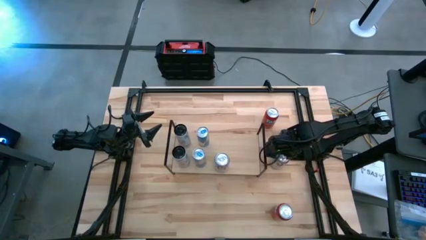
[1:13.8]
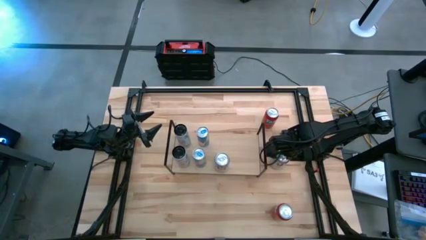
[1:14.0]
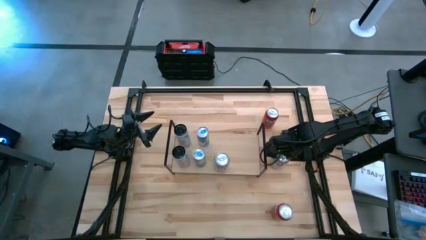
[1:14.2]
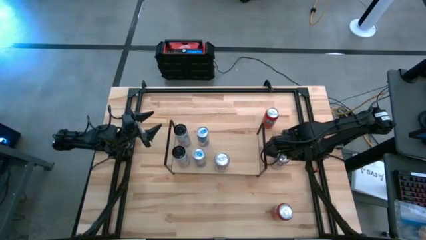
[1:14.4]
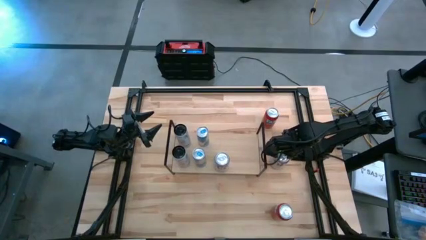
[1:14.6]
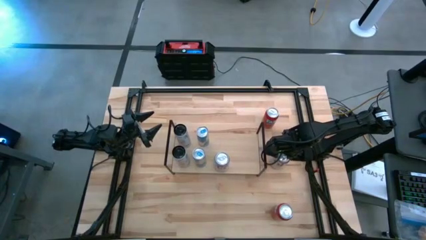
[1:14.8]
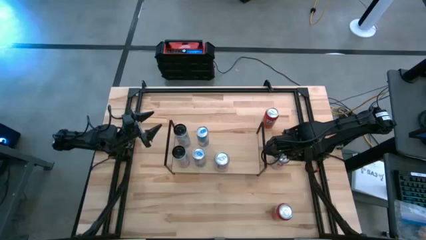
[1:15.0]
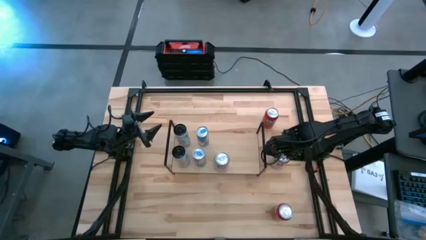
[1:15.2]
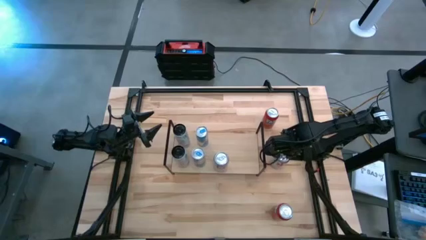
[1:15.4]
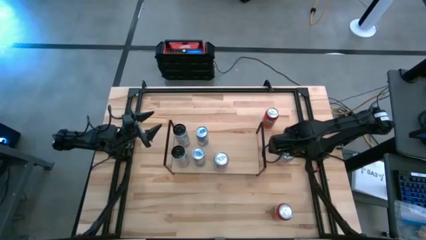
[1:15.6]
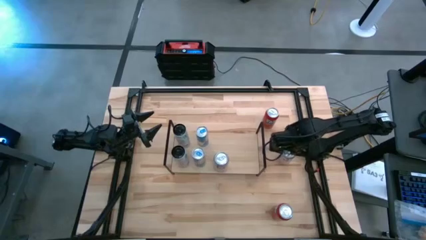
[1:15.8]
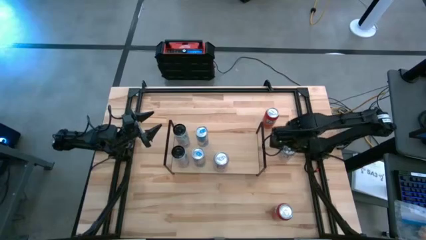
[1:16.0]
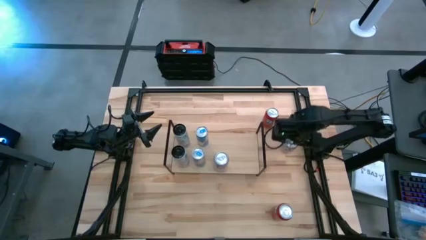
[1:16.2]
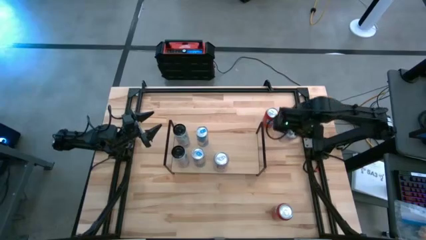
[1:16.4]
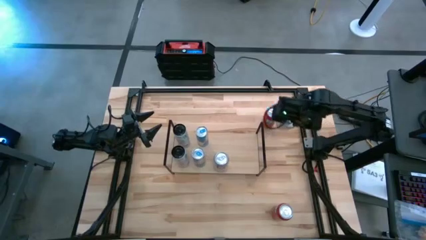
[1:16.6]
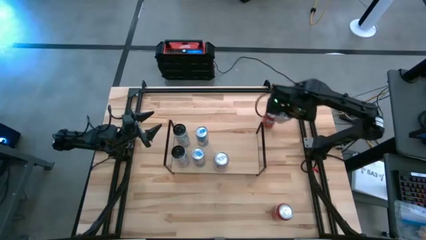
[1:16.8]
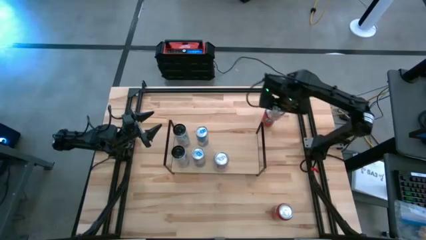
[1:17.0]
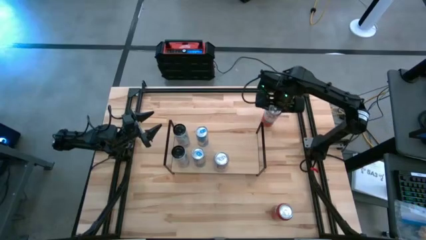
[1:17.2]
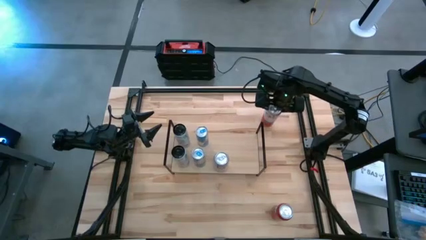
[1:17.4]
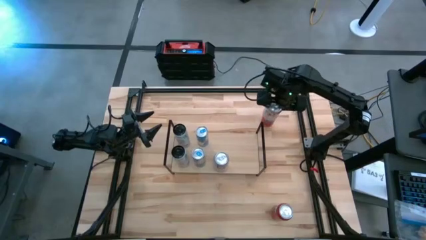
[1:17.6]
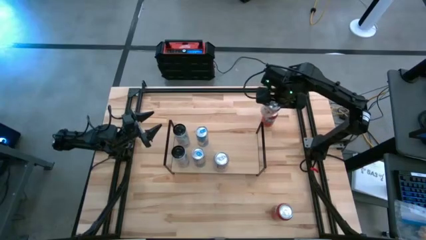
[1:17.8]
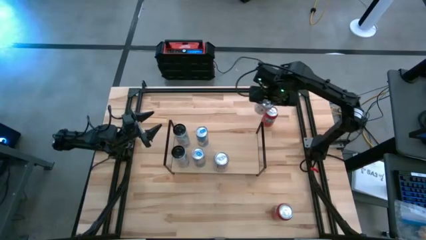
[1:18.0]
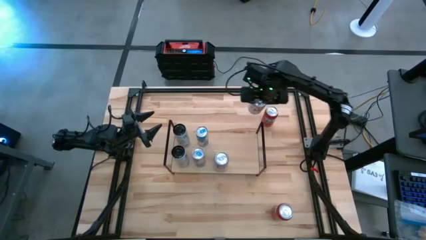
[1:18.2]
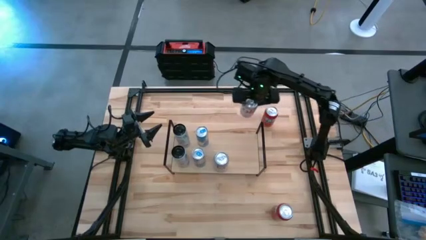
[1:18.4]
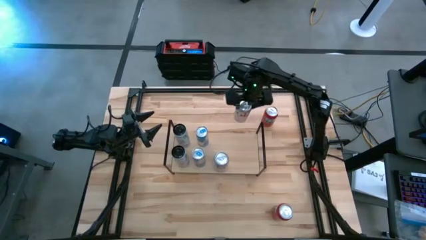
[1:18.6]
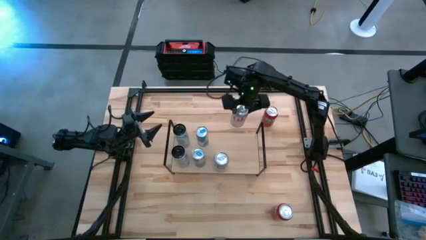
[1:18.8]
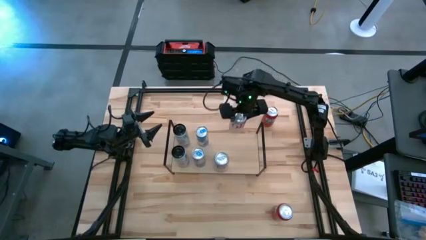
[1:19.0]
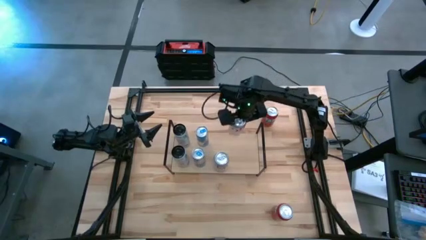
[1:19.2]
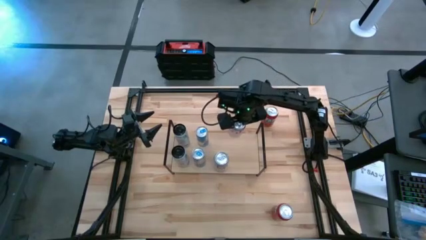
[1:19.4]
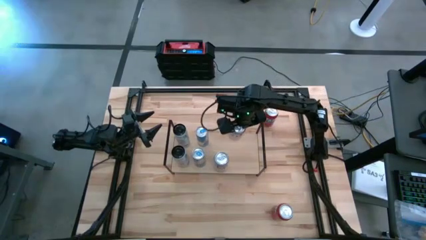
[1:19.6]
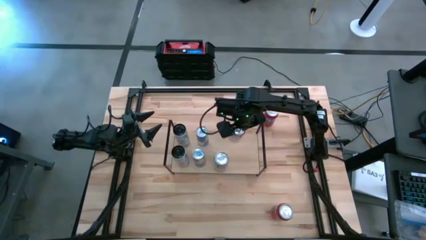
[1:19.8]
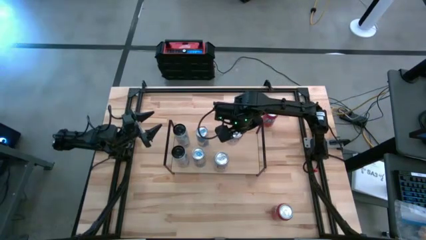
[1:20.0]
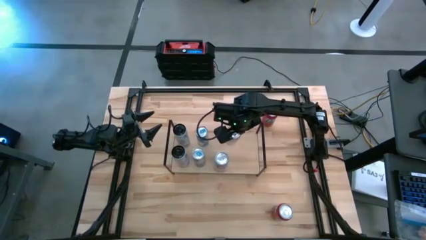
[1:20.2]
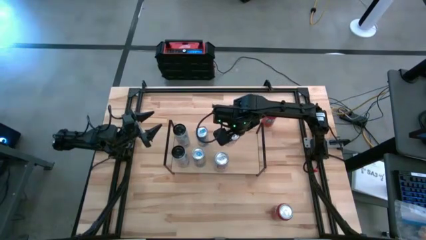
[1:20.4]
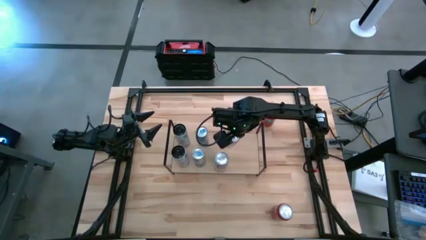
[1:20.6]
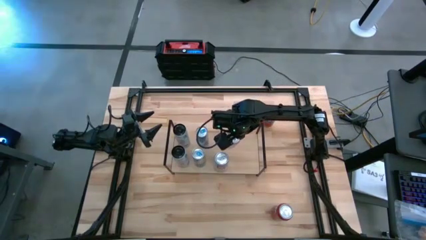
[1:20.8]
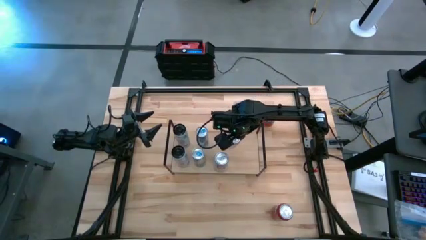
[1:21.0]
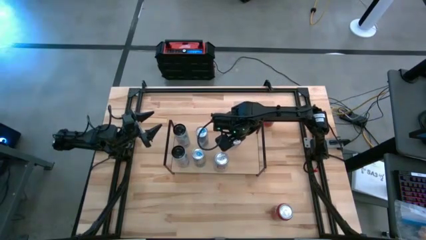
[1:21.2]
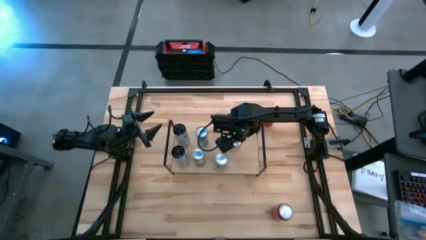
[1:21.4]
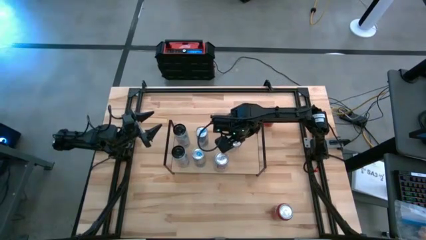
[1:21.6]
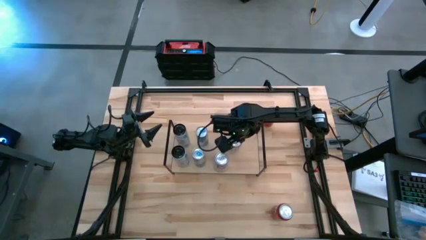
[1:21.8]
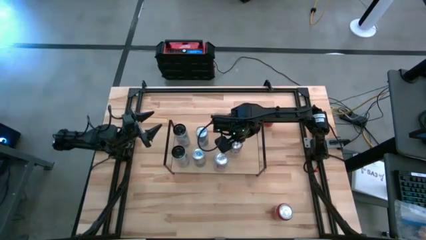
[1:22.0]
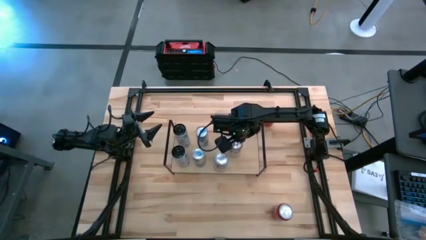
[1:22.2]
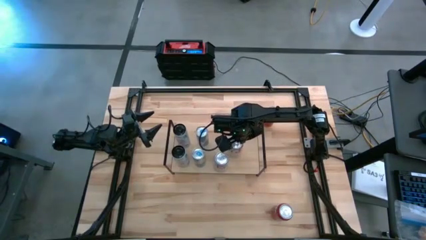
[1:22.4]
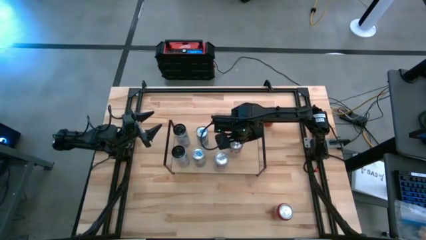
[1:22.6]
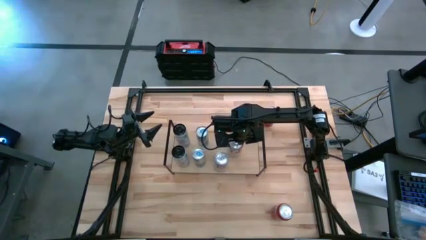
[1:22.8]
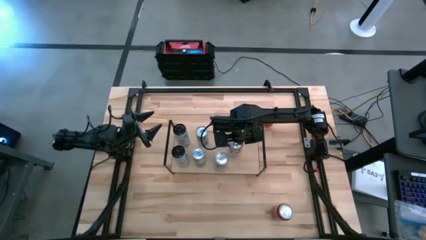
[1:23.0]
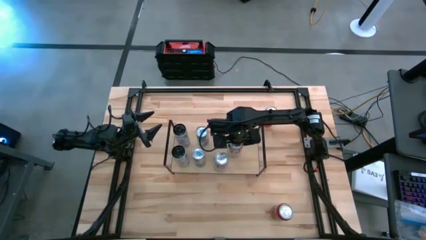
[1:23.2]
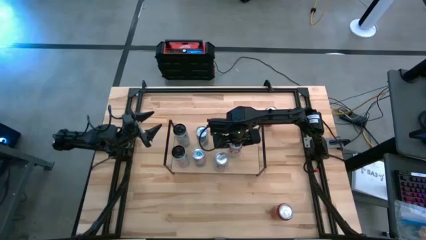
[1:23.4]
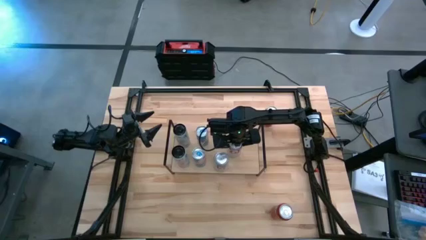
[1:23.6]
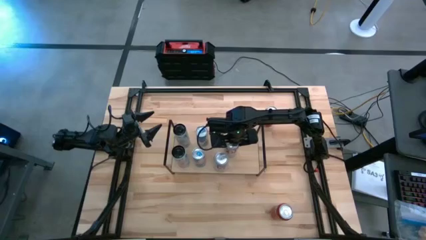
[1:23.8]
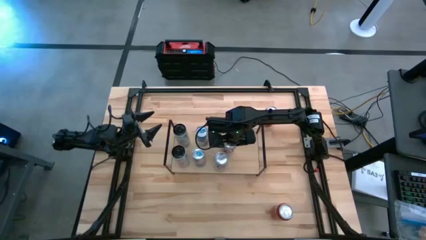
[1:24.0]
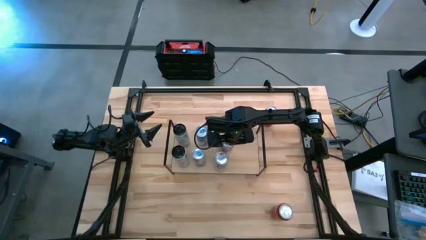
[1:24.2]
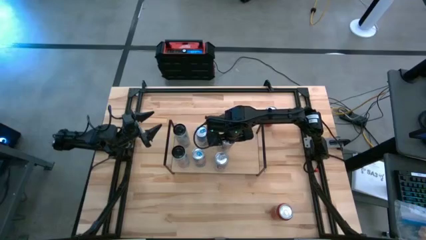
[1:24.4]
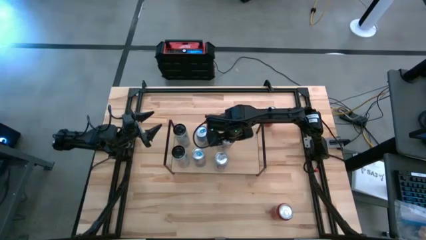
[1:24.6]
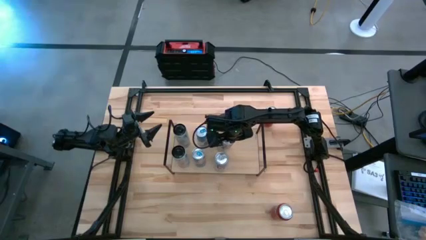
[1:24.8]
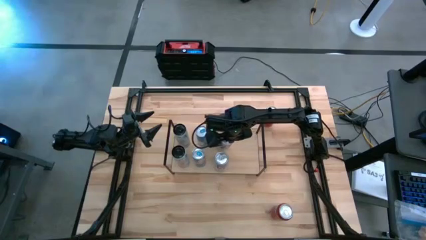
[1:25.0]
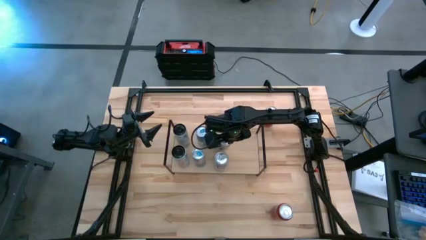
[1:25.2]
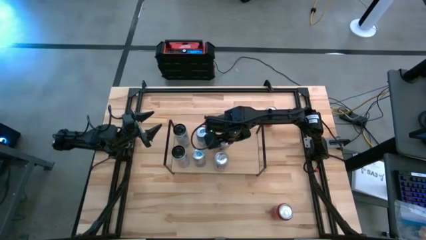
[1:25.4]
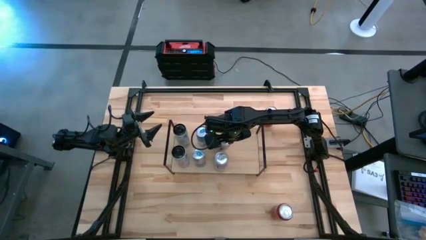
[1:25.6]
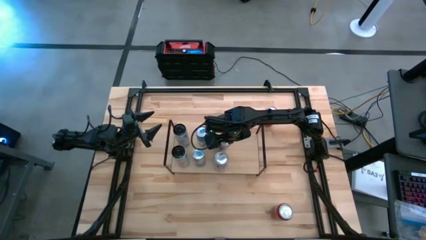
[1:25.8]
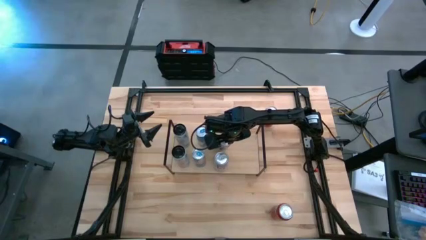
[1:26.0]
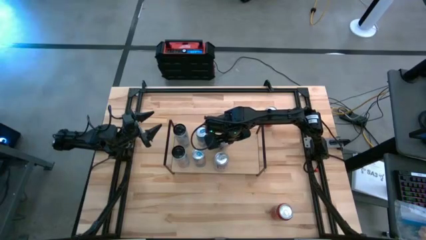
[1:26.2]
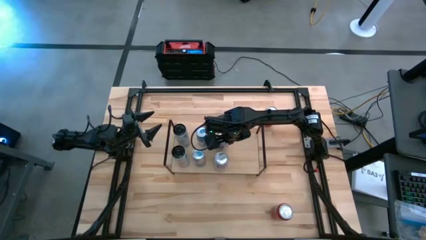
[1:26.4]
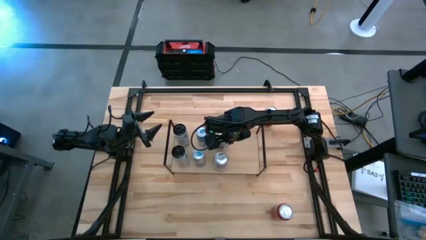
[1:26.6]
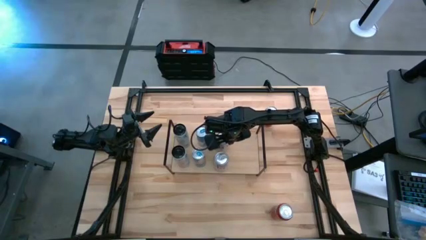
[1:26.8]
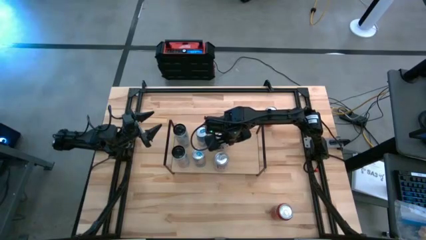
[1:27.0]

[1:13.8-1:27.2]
Task: Place canned beverage on shelf
Put the red-silver soda can on the shelf aligned with the red-silver soda can

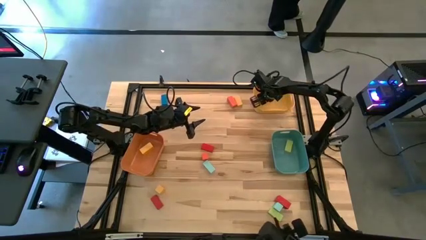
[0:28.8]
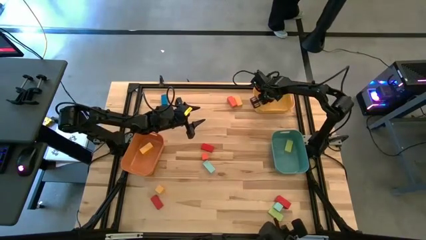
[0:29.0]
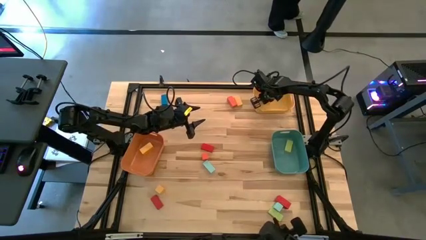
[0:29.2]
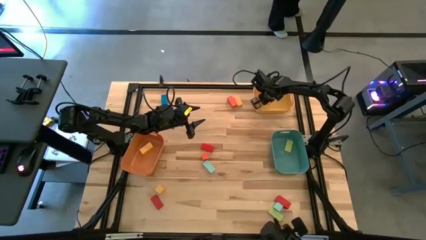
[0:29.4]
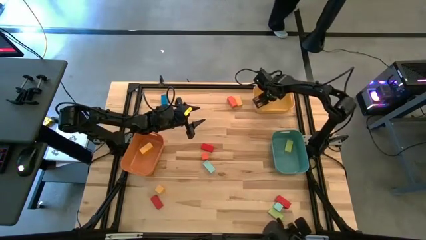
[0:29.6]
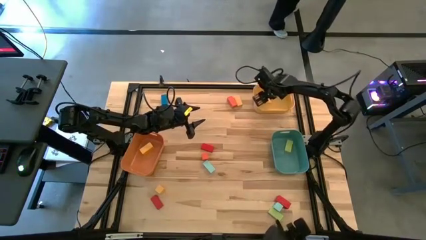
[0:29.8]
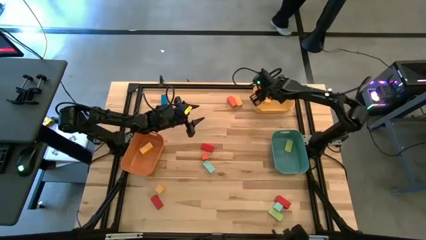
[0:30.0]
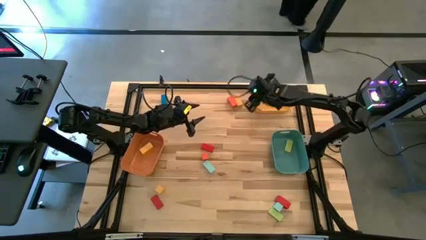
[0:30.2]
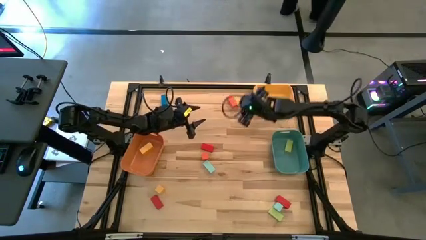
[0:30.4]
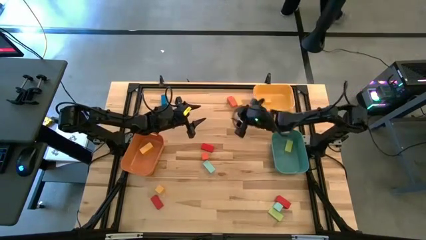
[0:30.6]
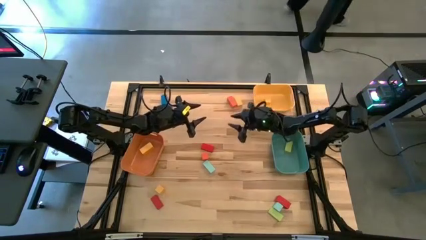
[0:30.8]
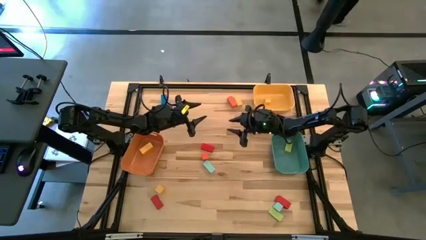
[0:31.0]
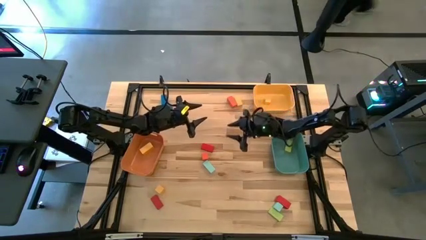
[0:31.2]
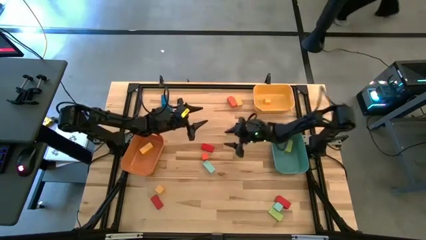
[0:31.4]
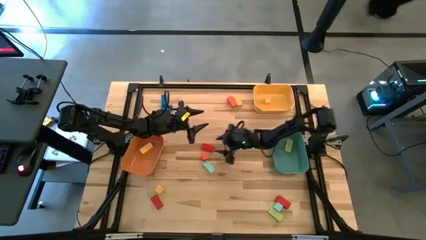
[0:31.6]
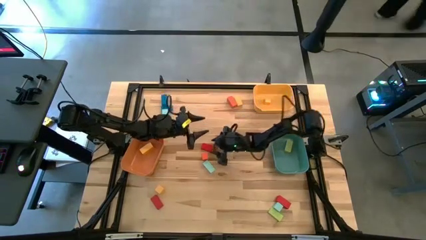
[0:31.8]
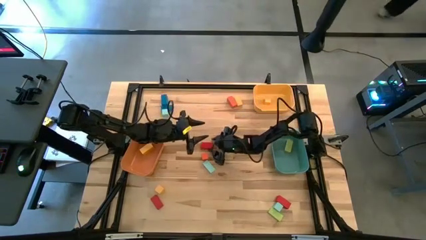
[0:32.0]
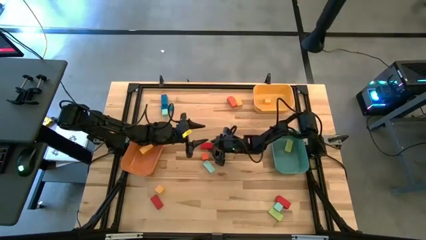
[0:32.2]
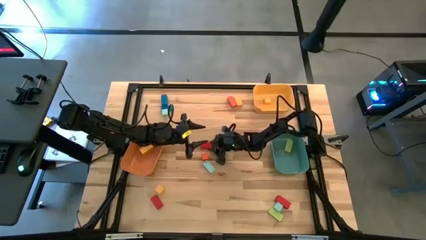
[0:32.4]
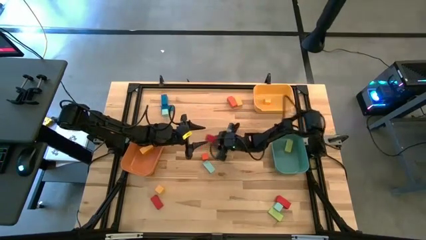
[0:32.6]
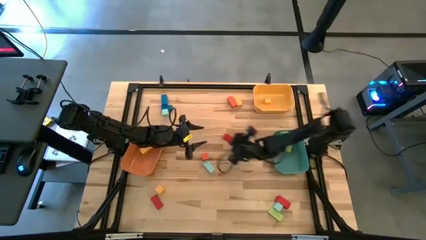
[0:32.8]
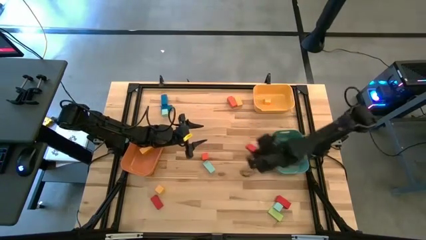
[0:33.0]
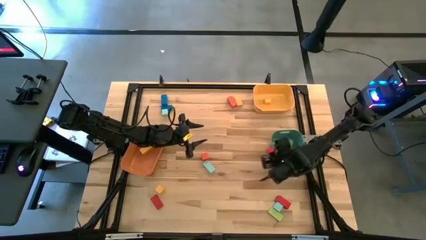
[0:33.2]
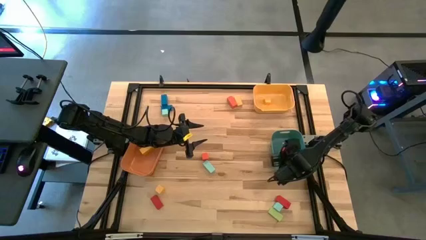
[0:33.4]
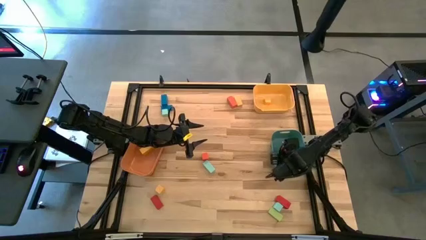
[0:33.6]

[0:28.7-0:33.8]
Task: Sort blocks by size
Put the top thin red rectangular block into the green bin
